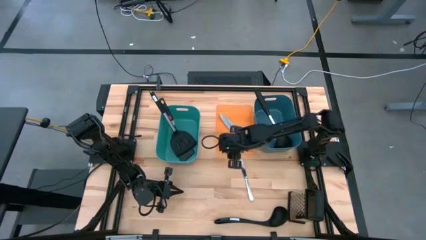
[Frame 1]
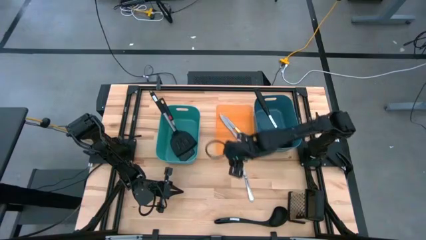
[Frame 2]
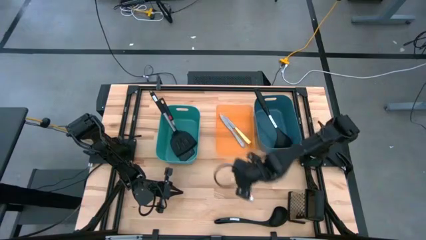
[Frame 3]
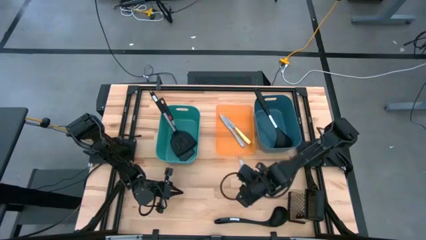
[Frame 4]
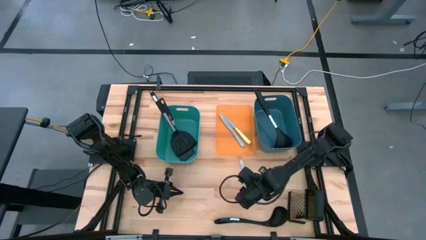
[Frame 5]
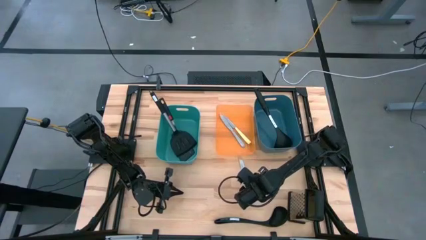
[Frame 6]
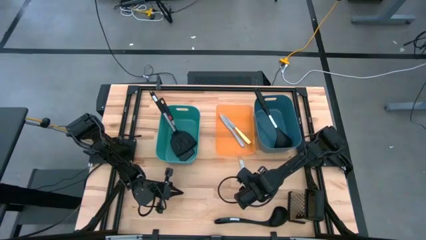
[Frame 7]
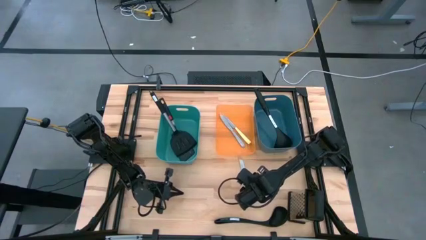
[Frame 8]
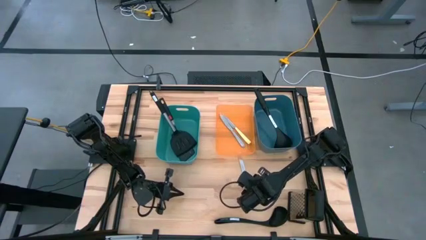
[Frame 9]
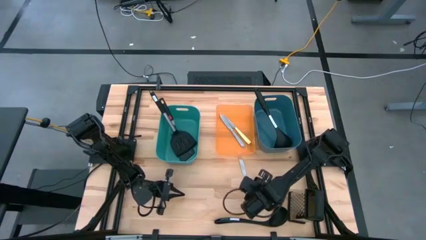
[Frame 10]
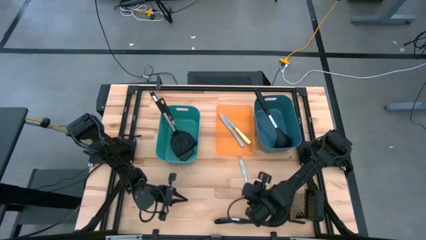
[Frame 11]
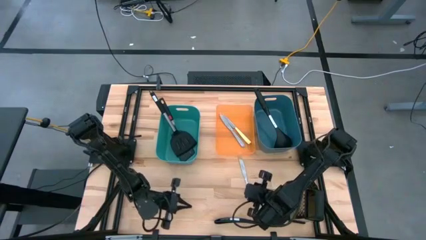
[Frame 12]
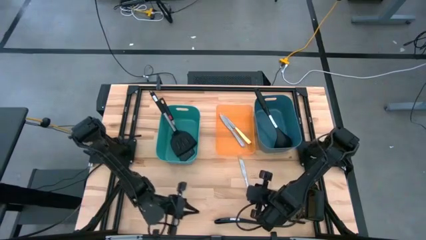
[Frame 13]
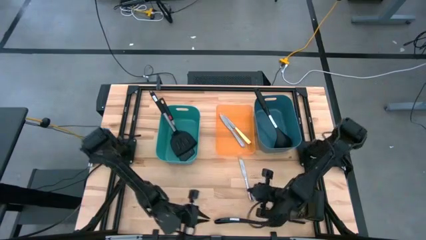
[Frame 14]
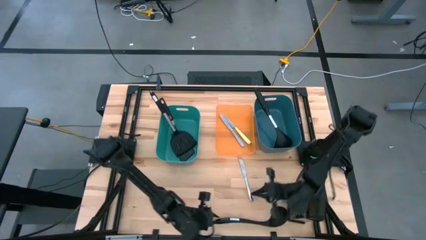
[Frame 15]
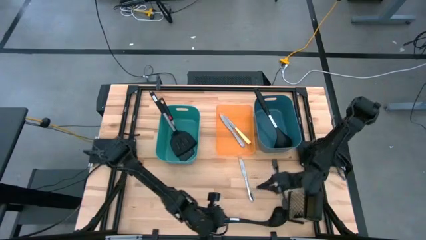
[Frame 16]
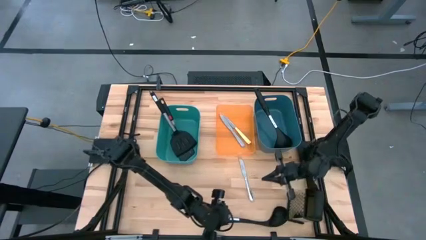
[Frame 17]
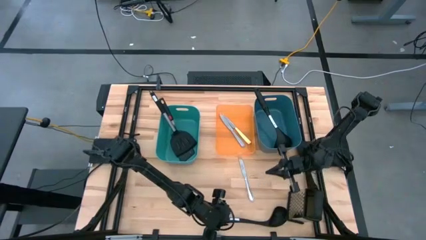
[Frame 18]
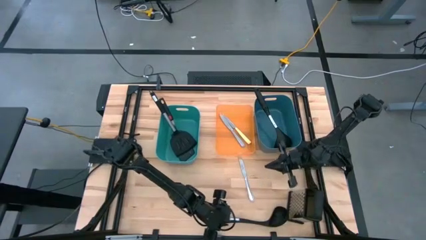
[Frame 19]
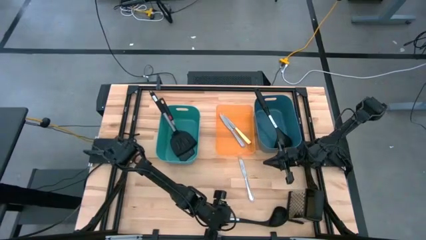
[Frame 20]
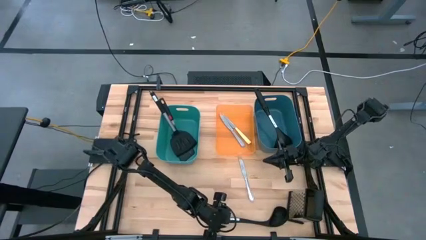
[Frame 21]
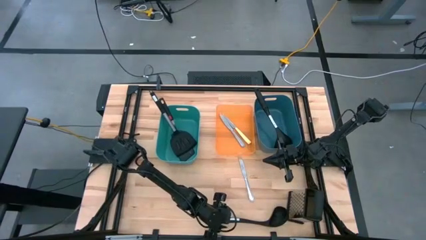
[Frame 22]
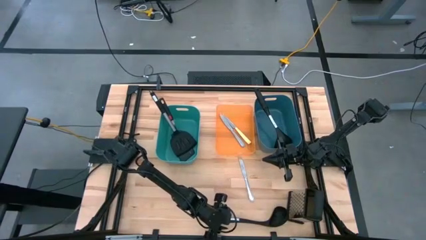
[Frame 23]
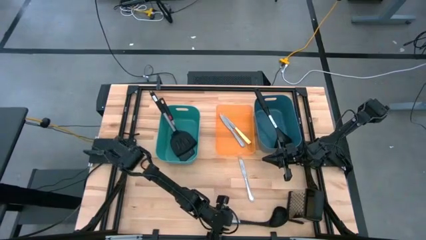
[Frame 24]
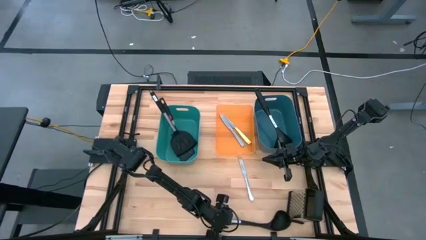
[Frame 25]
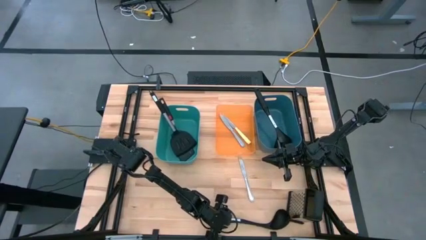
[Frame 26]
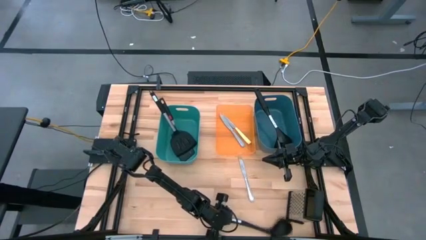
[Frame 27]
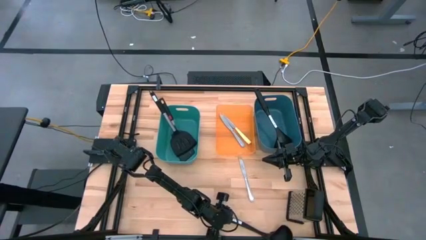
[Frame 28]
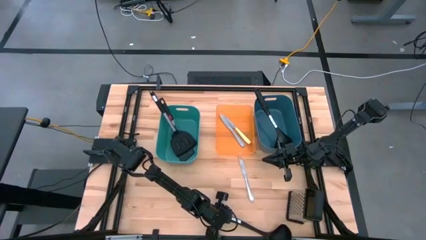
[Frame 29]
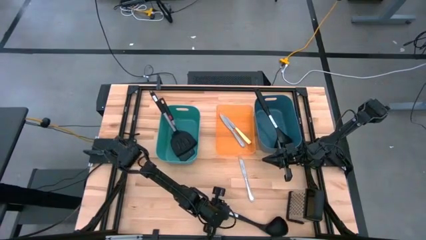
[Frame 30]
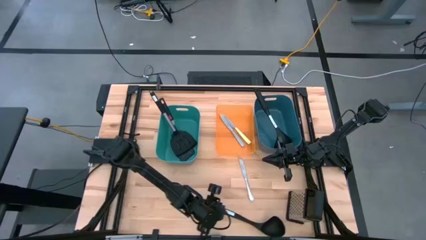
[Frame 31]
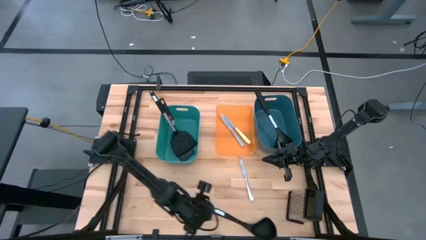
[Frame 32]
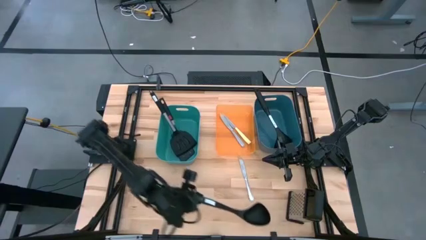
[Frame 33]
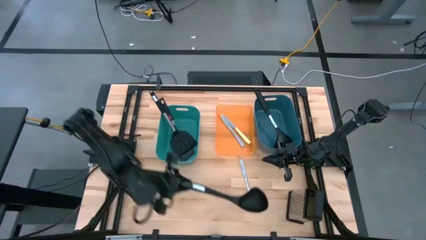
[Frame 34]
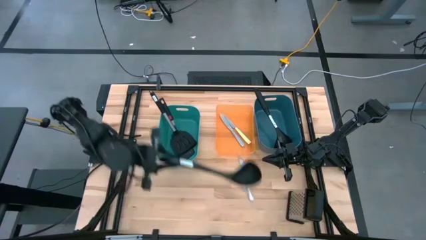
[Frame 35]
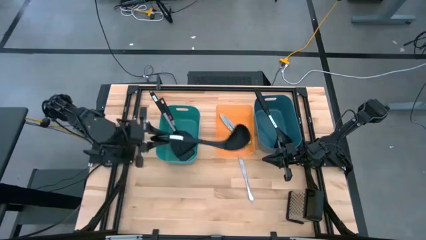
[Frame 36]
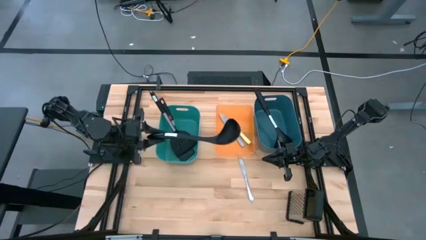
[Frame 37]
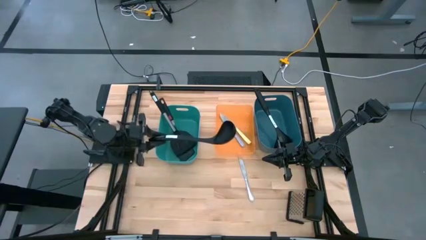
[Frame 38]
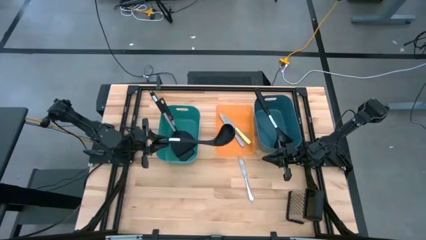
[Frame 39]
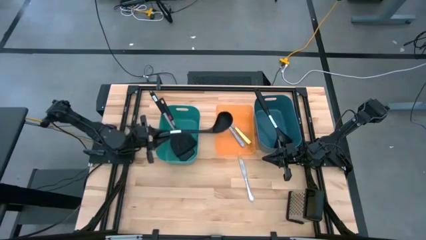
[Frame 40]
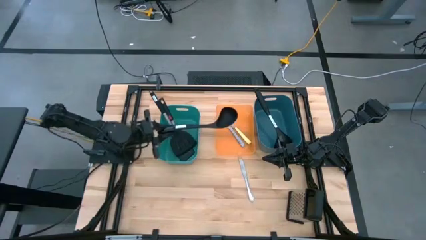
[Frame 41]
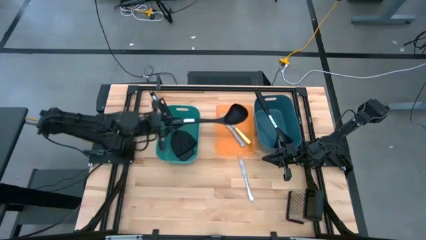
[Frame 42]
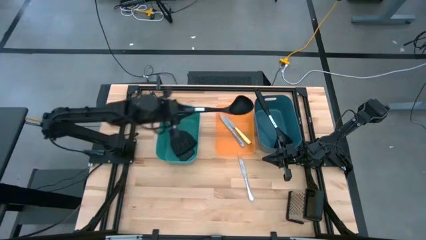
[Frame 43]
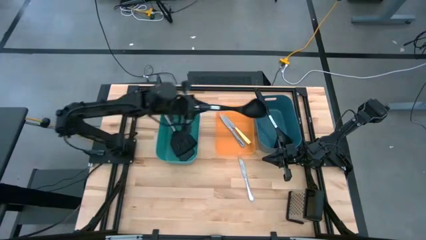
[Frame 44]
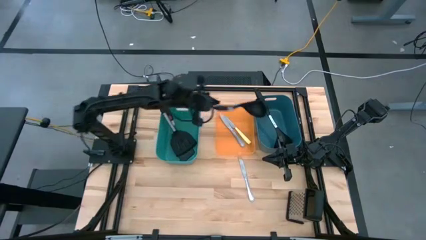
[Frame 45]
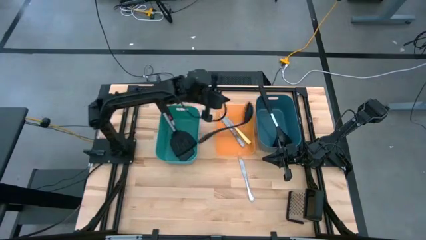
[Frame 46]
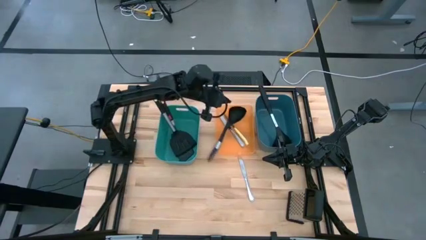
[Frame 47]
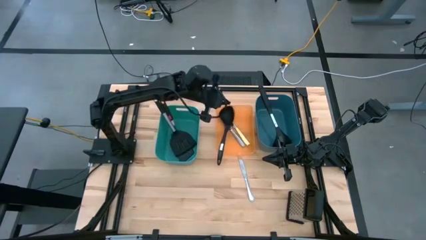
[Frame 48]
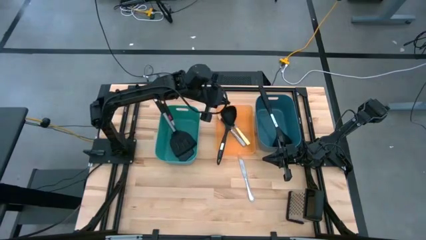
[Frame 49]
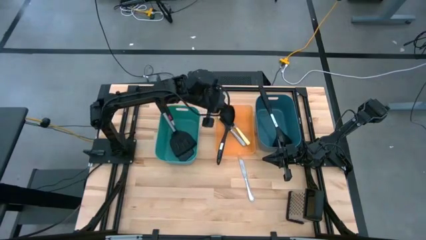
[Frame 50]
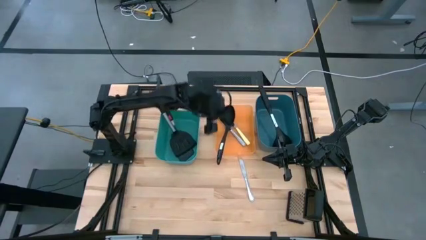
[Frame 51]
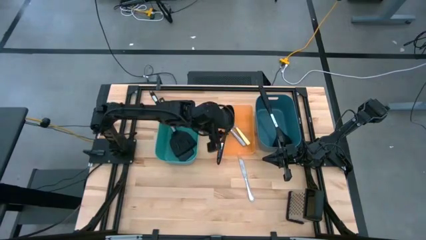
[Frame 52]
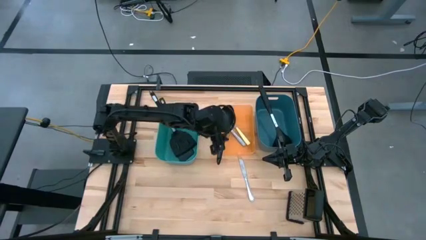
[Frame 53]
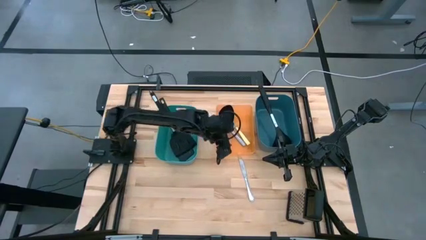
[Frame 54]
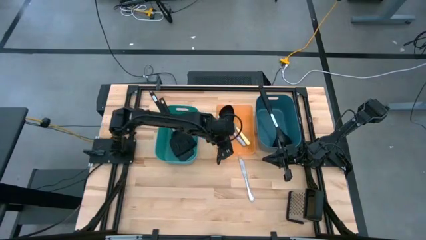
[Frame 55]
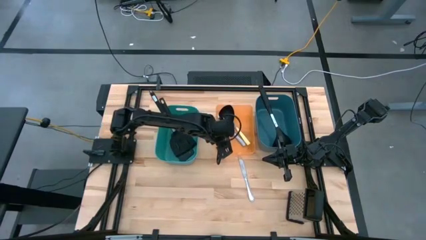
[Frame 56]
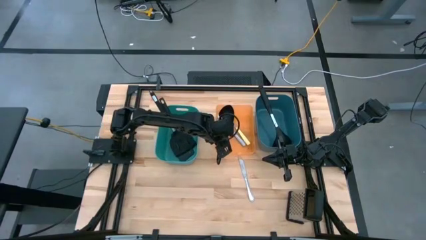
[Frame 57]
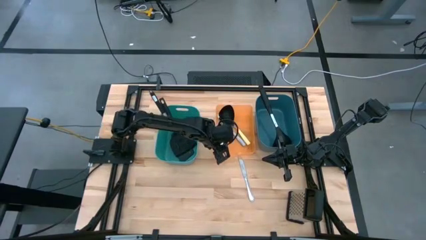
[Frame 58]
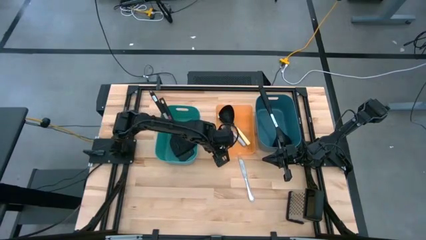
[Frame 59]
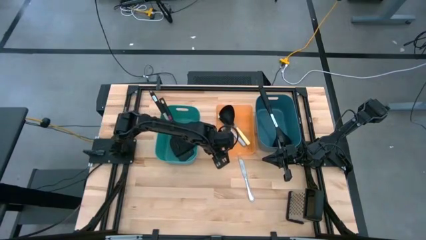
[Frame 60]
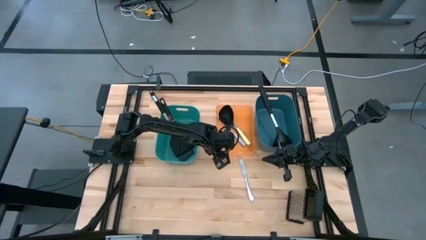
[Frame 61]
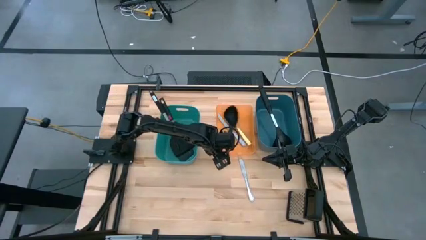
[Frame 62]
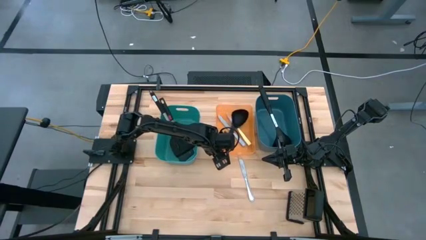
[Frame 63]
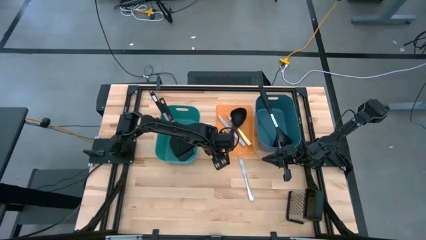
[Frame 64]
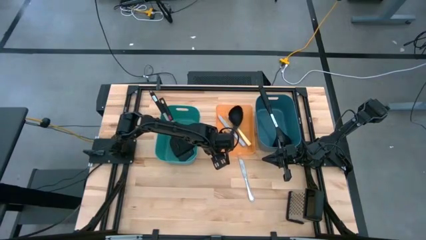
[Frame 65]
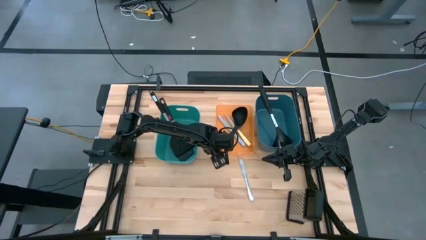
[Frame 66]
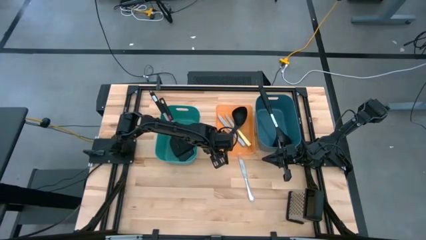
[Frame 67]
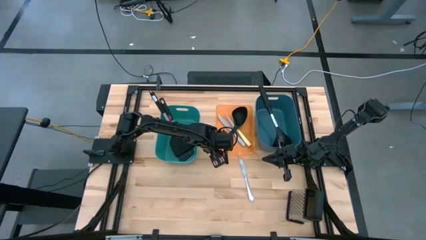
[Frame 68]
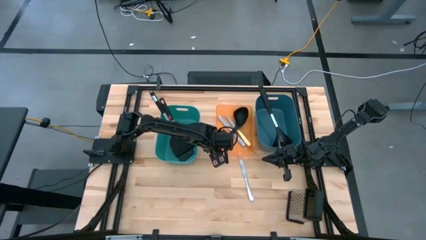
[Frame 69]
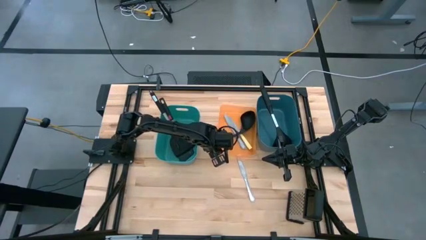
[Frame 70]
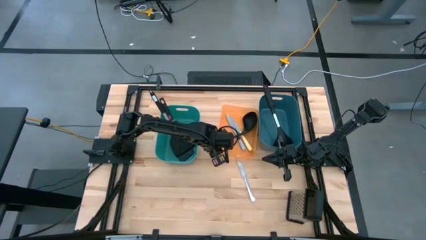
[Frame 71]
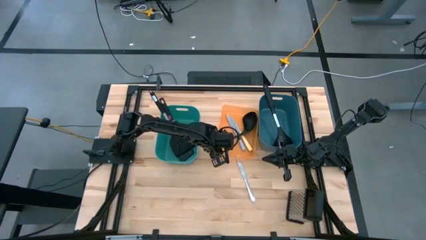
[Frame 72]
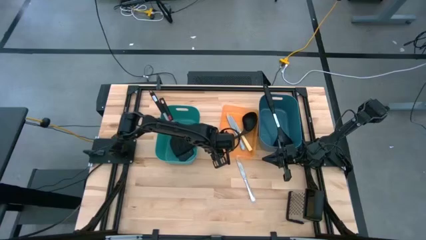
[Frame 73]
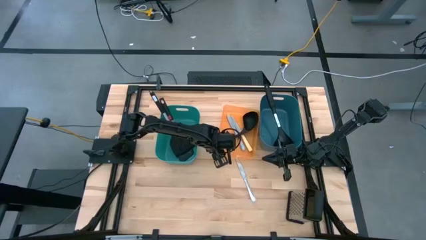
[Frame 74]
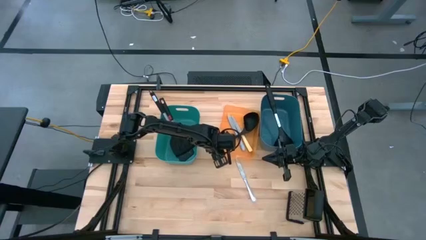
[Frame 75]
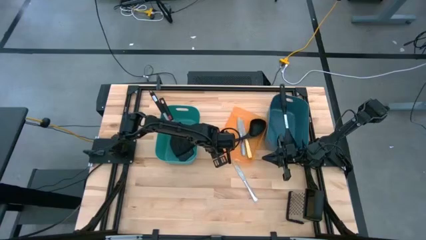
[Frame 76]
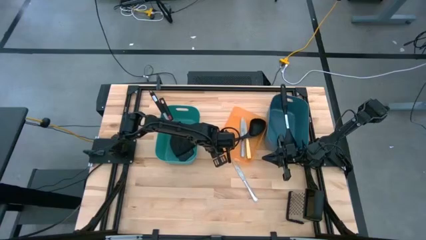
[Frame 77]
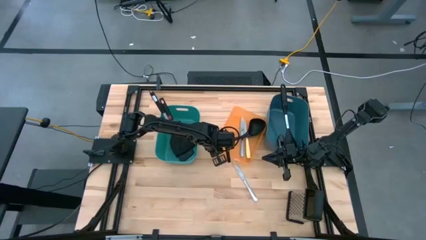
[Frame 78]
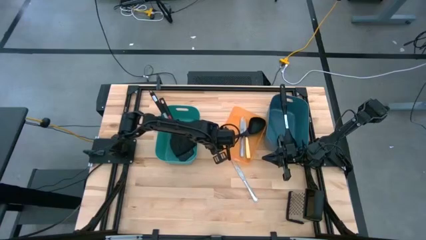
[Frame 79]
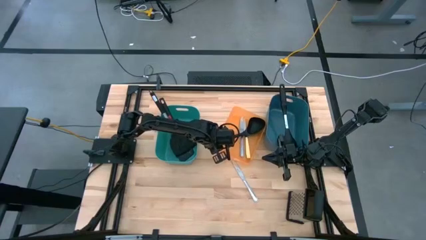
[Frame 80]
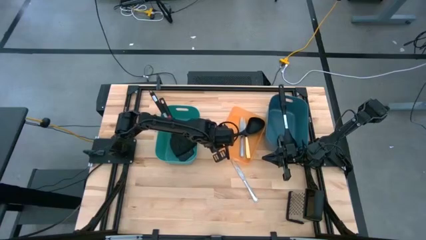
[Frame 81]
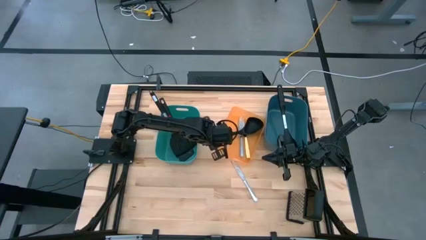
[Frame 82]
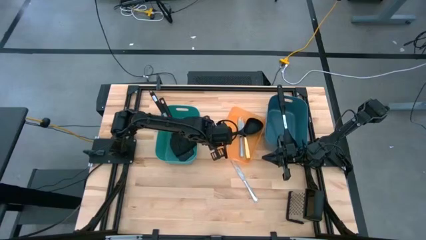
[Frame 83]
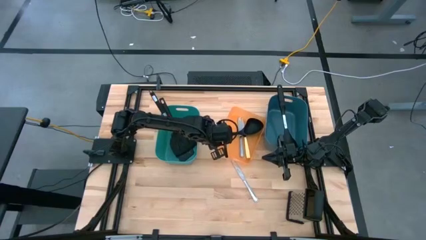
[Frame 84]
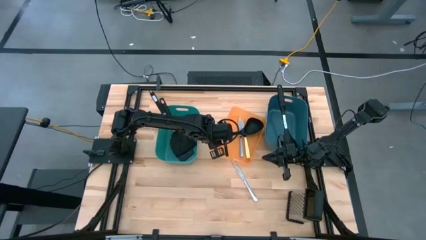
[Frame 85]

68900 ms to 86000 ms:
Task: Pick & Place Kitchen Items
Put the black serving spoon into the blue bin
